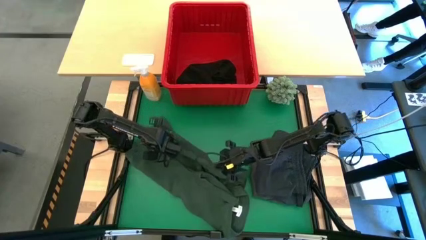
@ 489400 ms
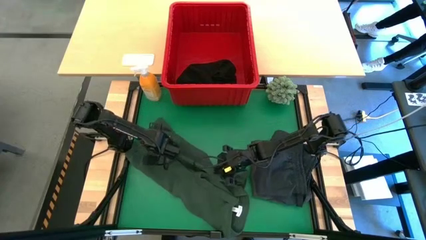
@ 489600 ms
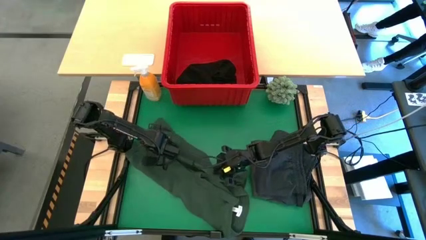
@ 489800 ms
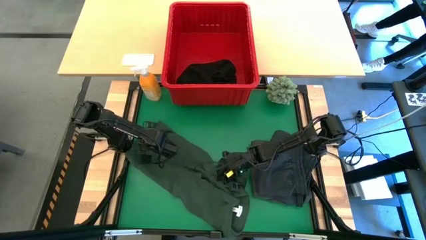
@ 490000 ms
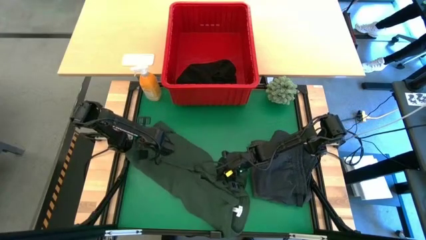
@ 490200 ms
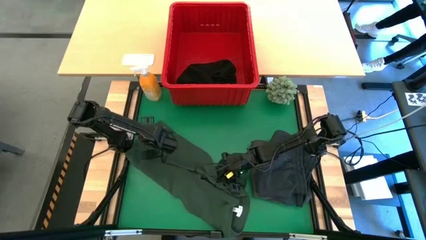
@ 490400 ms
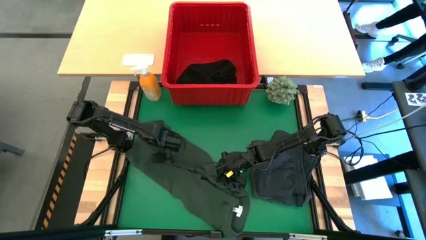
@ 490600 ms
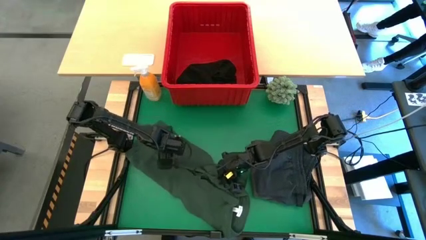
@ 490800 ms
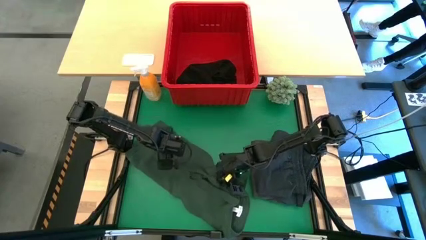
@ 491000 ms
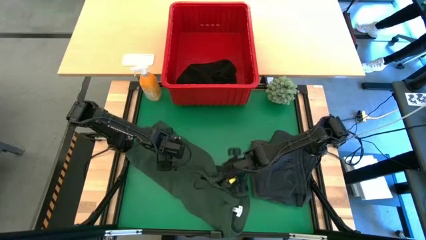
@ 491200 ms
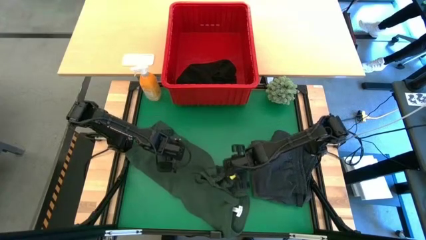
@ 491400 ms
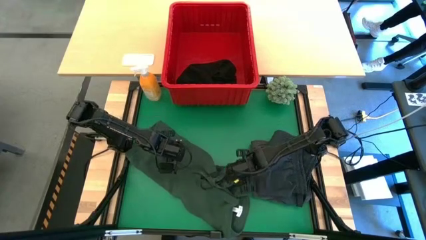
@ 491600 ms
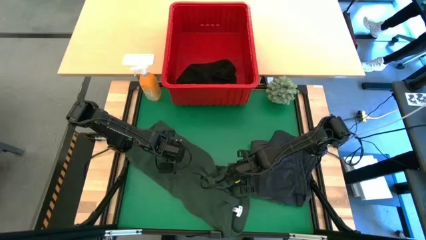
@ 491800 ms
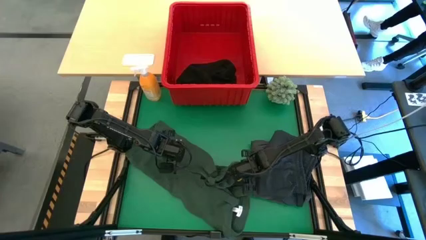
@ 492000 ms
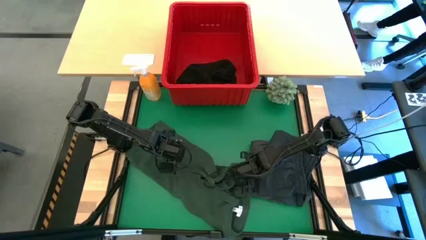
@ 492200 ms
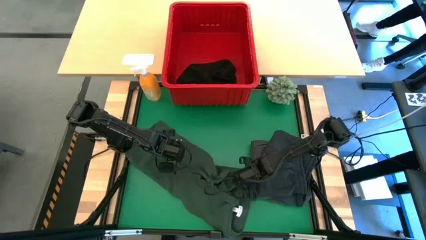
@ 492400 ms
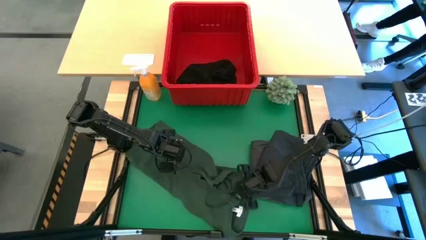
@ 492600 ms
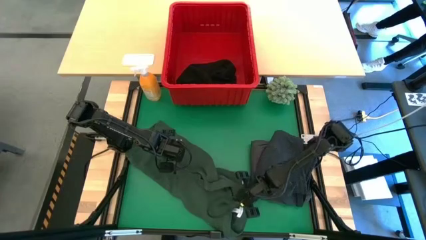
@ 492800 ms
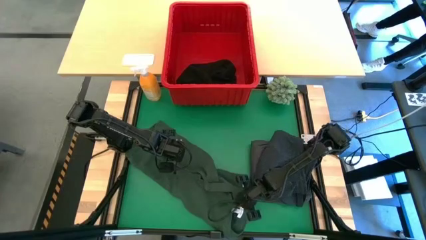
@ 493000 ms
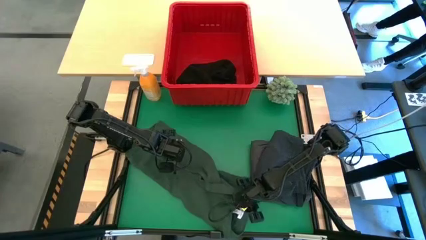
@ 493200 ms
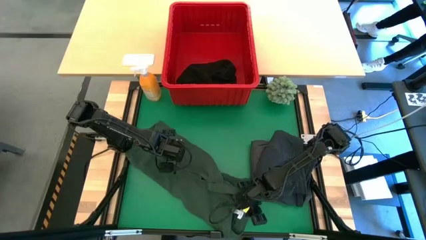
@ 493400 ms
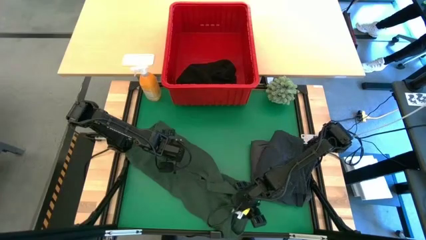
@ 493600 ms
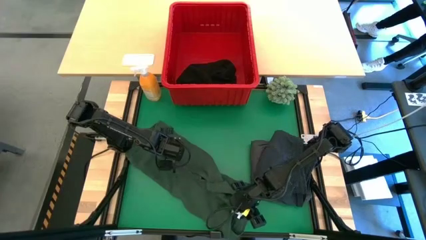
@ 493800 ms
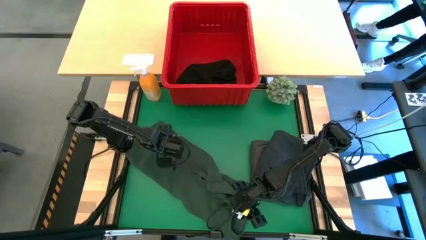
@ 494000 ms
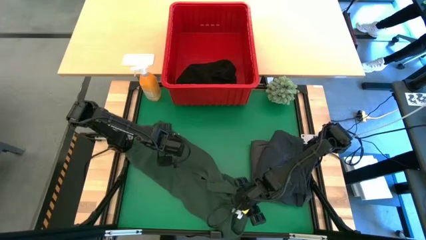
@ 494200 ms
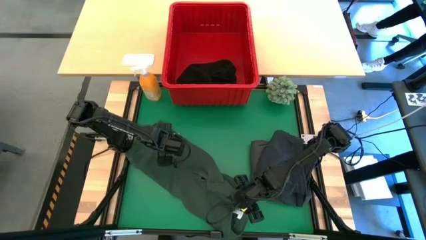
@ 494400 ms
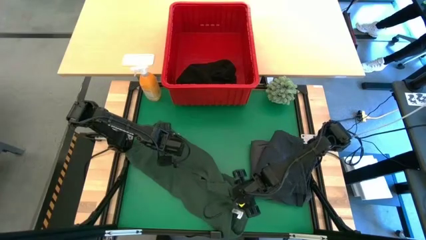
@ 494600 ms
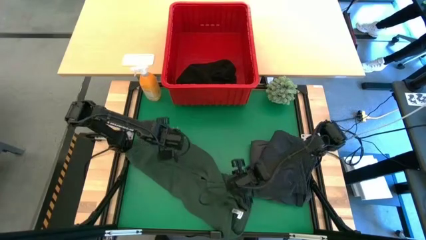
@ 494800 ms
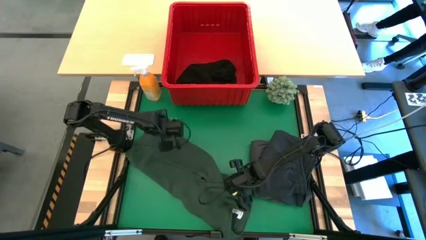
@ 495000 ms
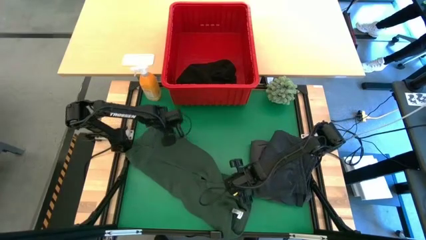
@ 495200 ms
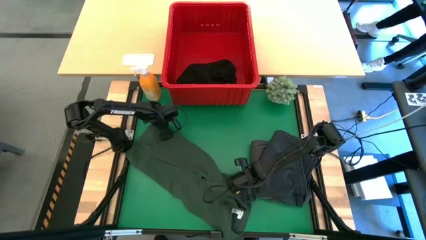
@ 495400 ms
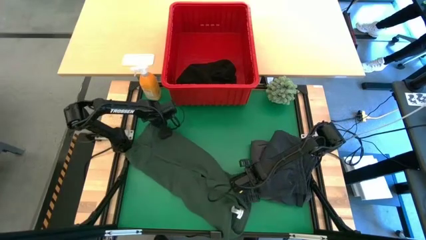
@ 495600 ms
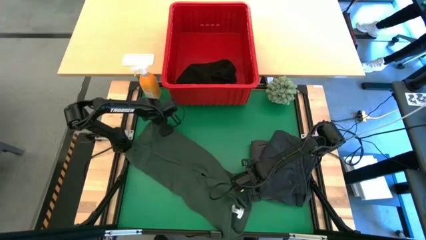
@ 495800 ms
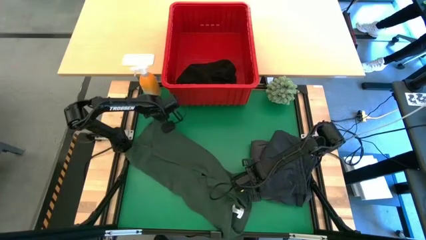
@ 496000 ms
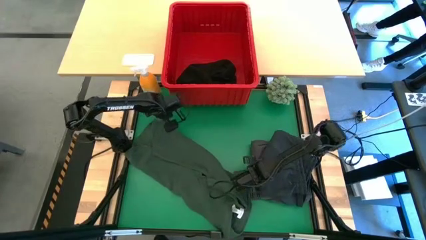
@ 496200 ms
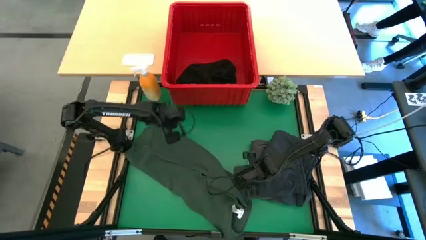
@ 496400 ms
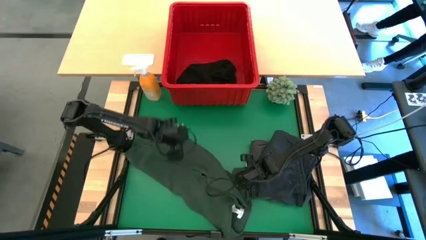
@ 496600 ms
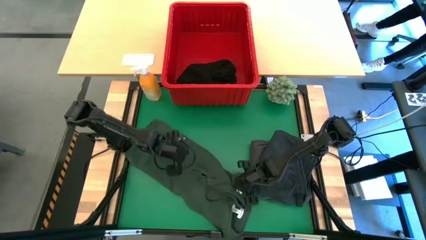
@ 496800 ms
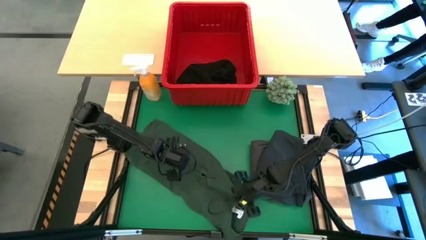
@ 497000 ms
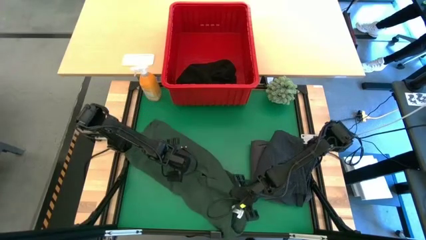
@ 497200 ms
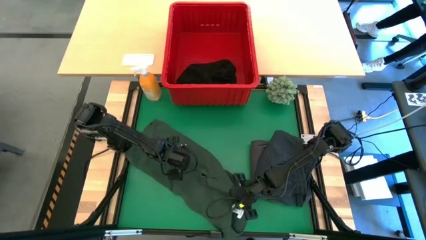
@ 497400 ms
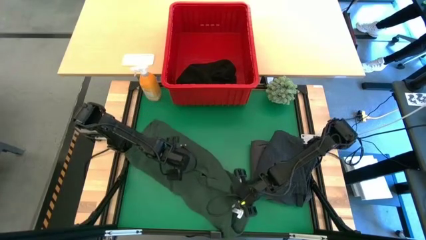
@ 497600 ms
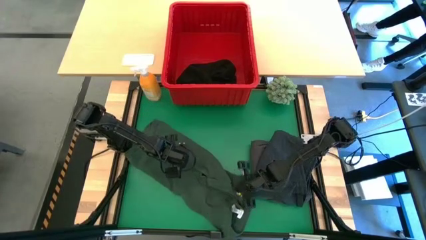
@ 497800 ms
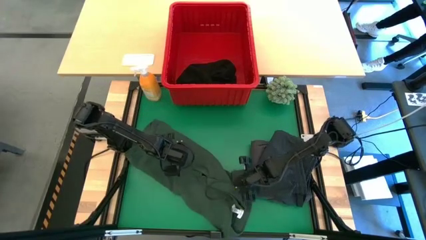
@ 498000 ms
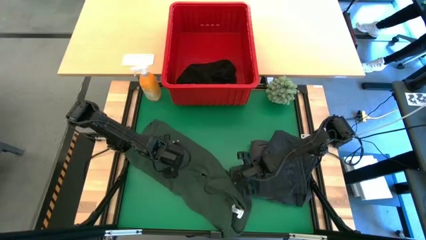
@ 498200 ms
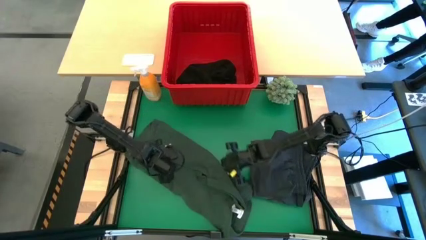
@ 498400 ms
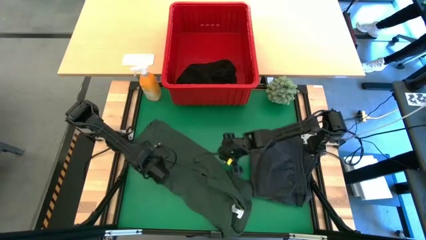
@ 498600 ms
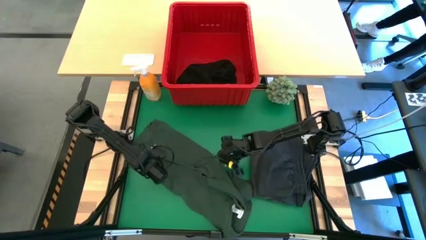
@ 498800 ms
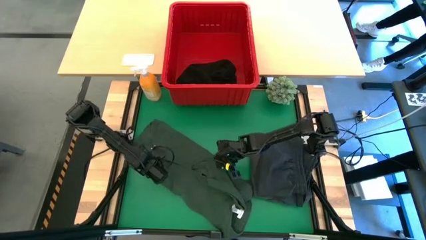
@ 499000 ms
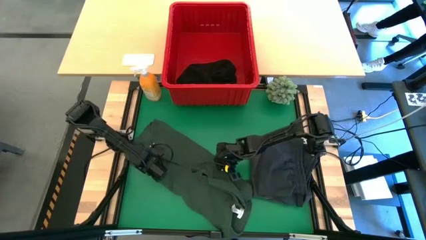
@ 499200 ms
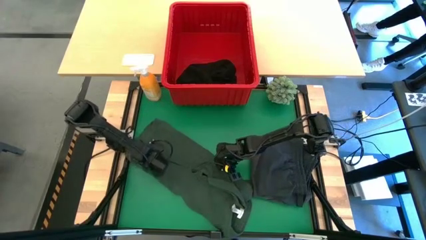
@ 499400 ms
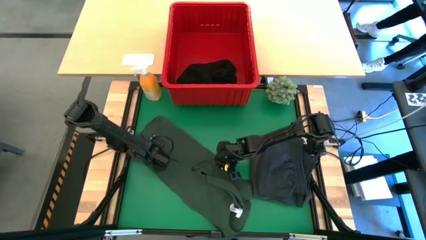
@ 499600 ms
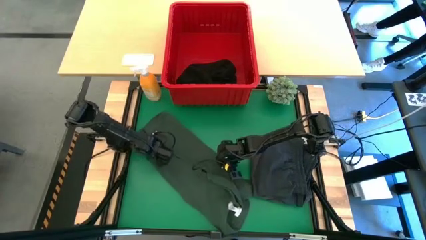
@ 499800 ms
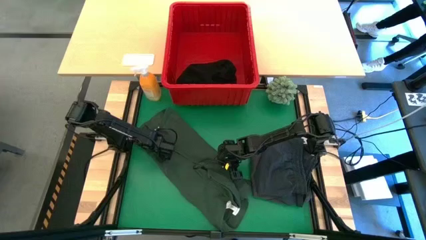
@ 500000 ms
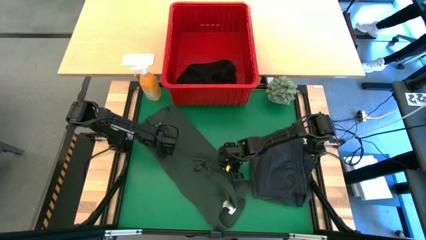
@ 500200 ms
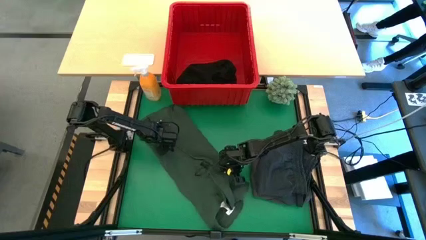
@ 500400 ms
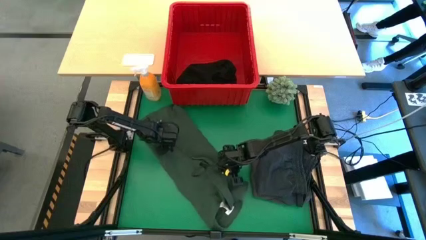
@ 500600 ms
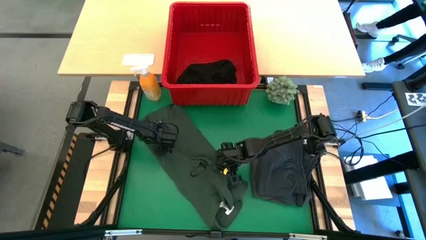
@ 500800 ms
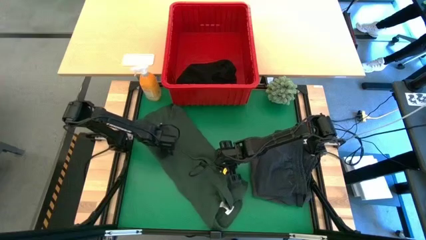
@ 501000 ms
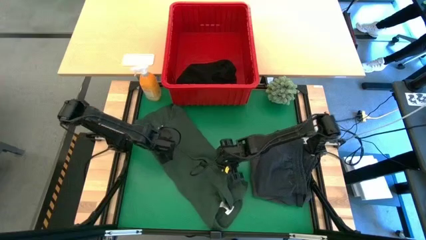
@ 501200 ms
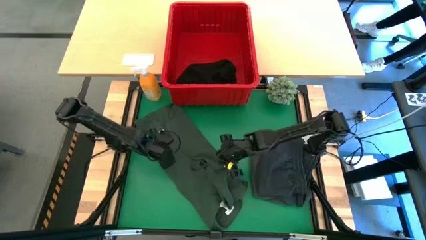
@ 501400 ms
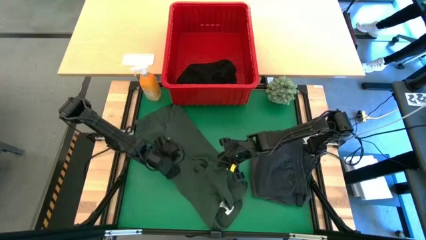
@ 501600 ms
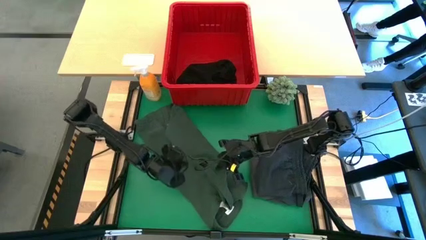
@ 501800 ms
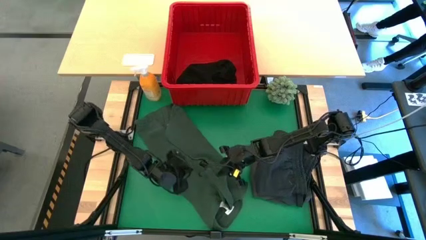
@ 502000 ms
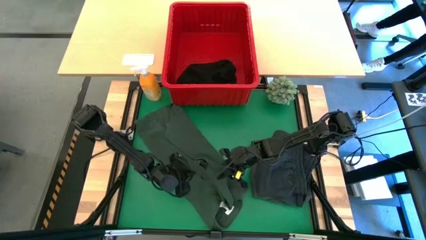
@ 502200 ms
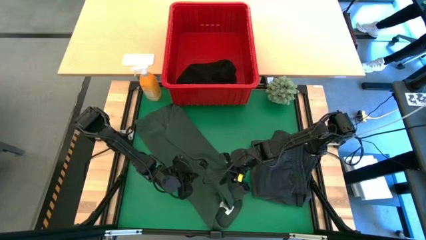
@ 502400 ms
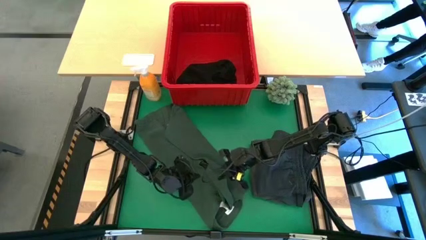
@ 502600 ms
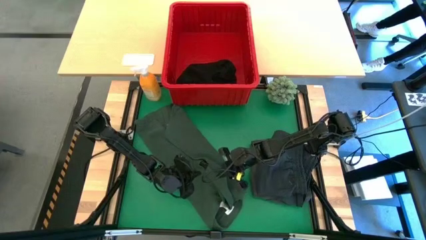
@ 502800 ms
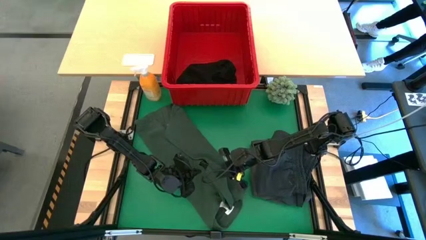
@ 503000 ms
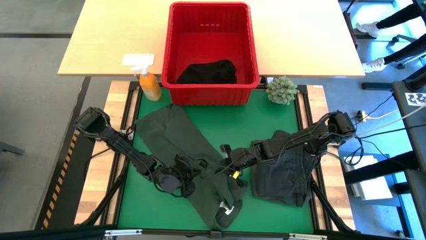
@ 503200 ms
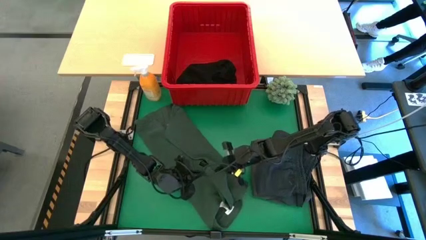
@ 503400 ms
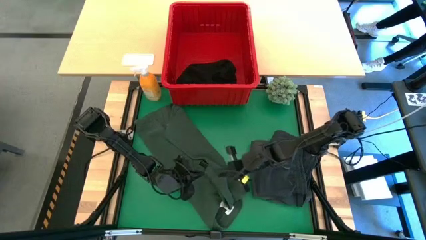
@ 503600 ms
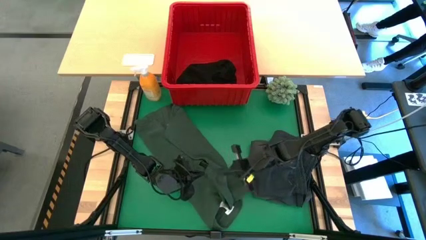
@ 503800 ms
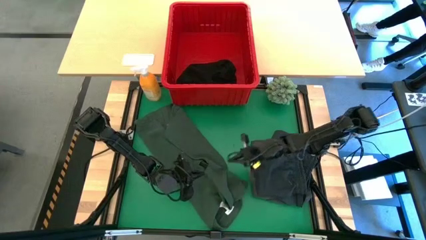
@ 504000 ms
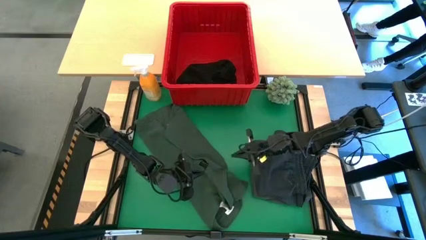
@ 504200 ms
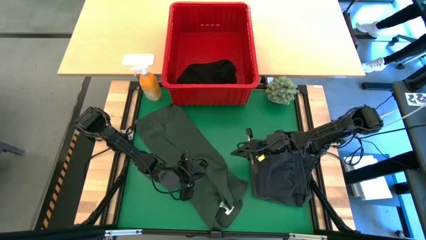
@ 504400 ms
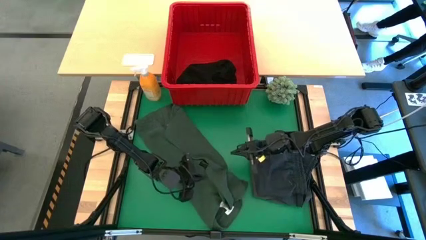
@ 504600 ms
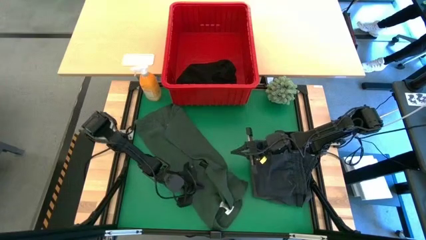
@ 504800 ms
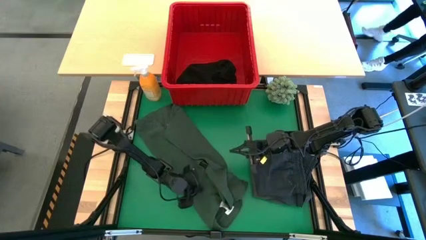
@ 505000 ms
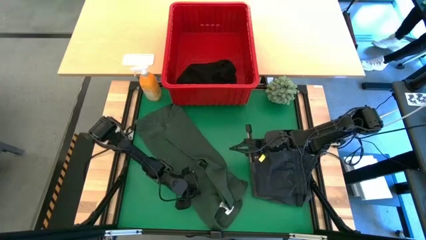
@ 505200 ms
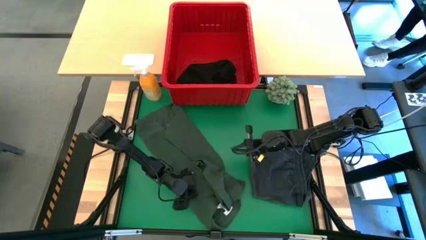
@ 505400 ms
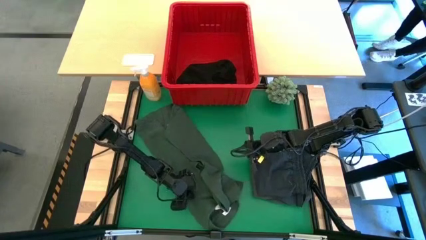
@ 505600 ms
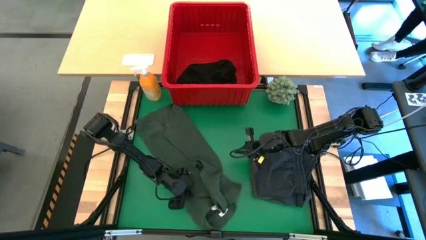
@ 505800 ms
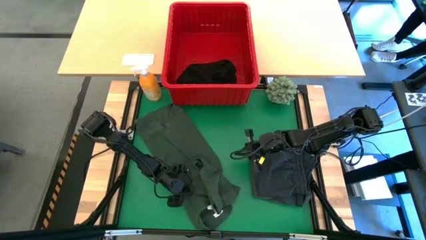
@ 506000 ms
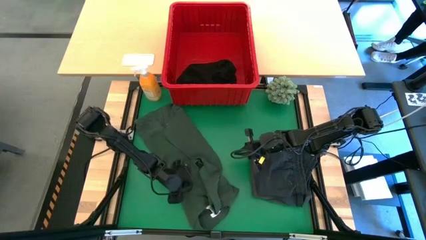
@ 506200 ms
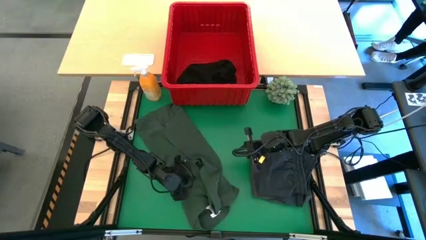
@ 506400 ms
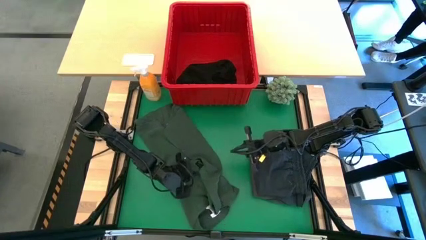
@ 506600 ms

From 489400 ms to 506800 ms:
Task: Fold Laundry from Bin
Fold the green polo
